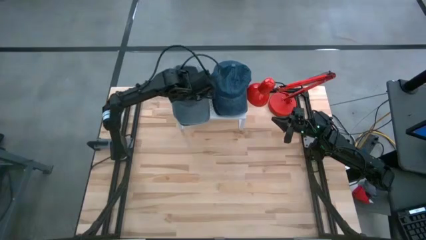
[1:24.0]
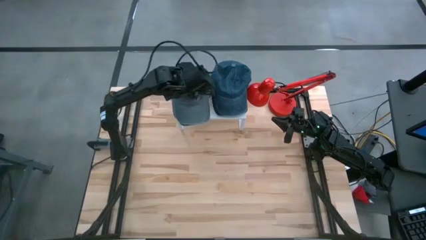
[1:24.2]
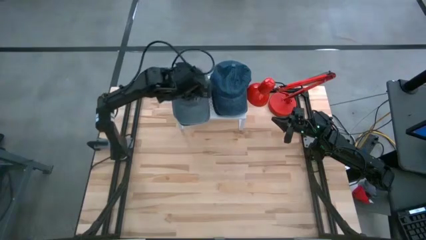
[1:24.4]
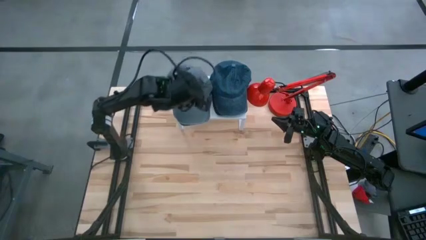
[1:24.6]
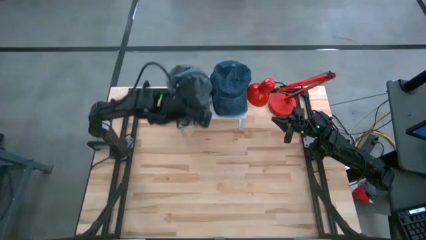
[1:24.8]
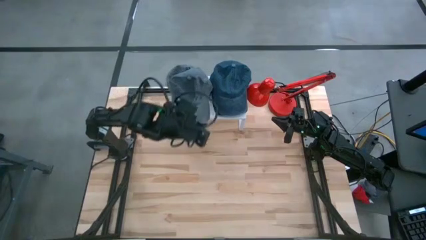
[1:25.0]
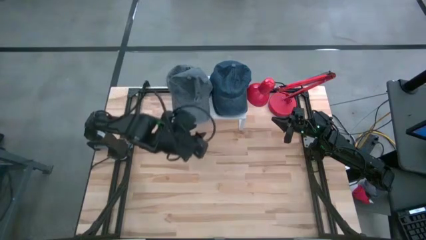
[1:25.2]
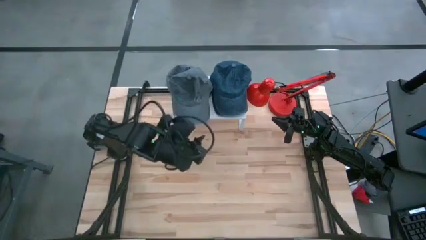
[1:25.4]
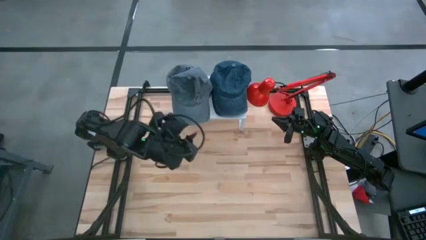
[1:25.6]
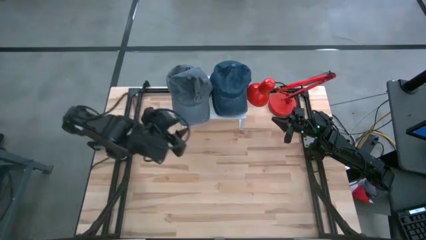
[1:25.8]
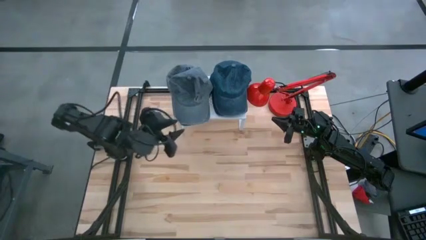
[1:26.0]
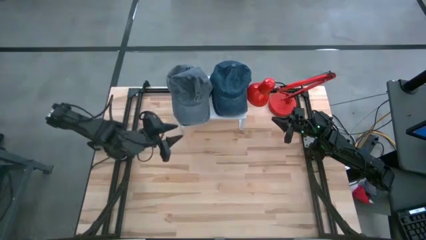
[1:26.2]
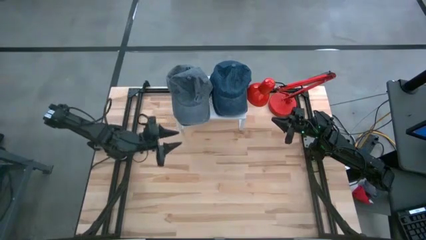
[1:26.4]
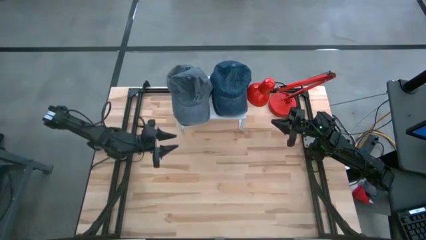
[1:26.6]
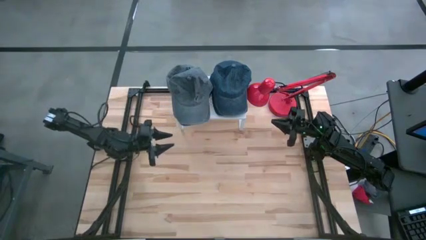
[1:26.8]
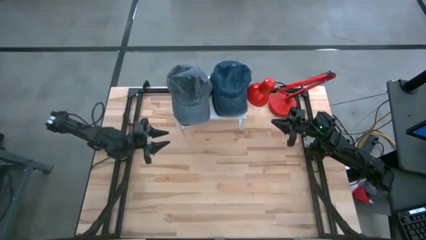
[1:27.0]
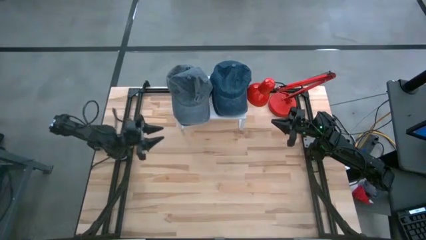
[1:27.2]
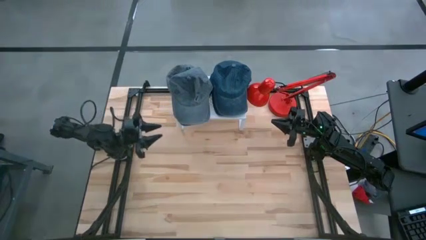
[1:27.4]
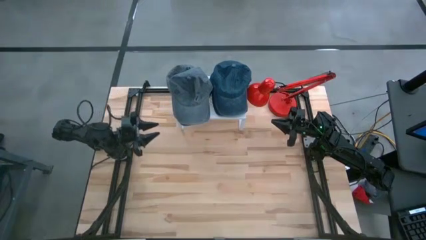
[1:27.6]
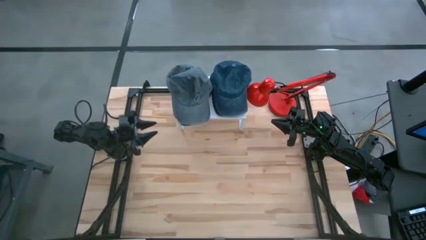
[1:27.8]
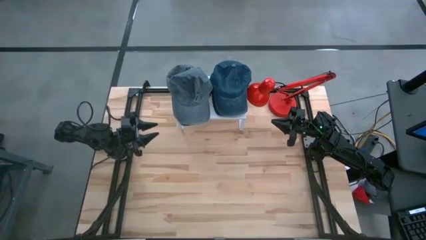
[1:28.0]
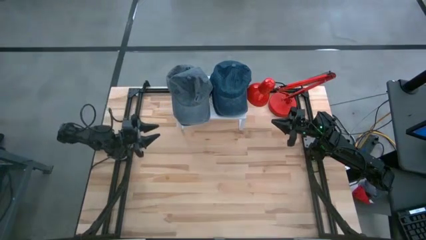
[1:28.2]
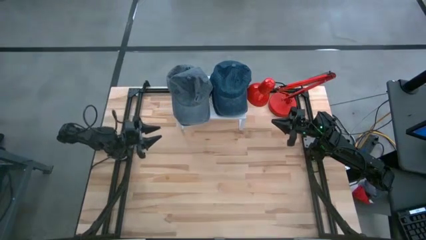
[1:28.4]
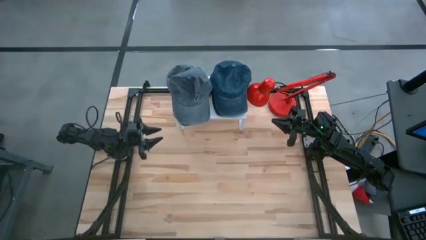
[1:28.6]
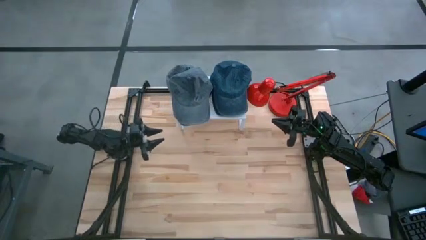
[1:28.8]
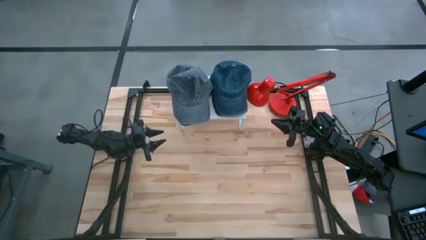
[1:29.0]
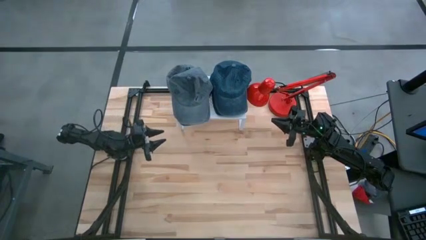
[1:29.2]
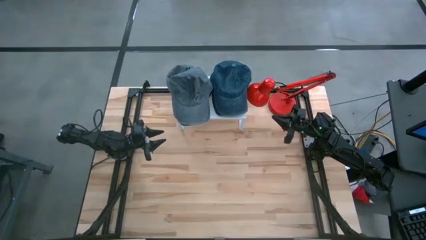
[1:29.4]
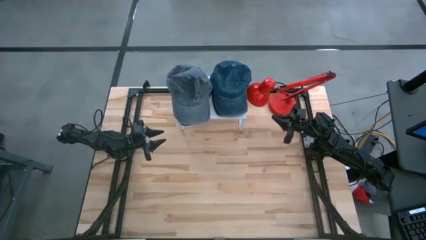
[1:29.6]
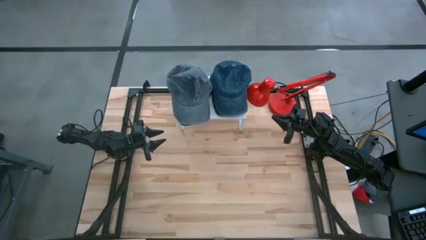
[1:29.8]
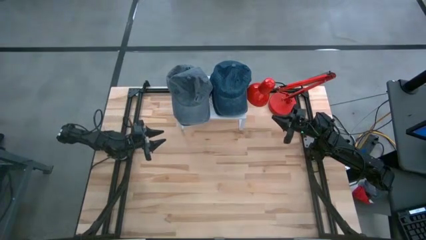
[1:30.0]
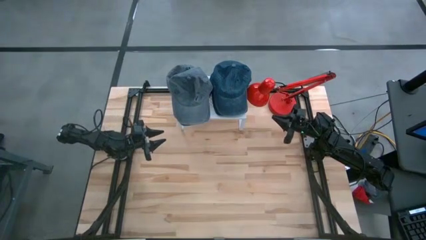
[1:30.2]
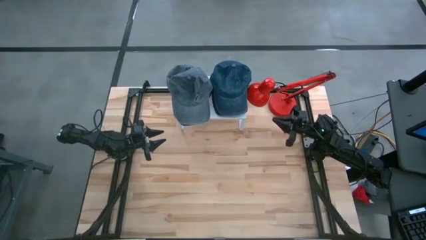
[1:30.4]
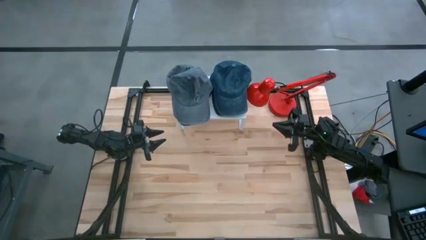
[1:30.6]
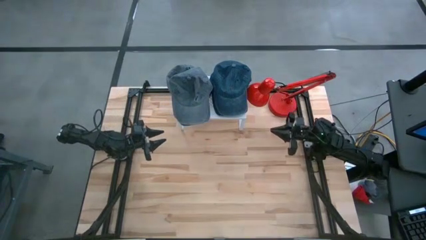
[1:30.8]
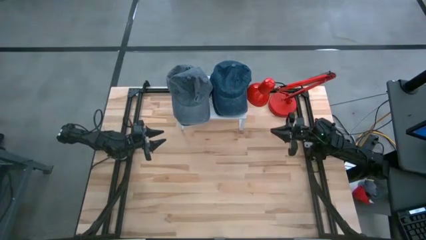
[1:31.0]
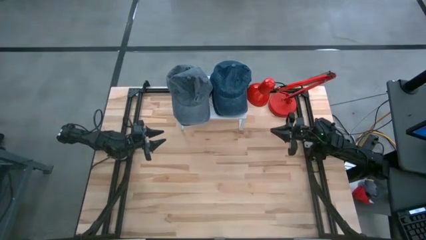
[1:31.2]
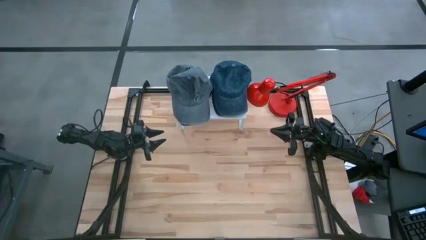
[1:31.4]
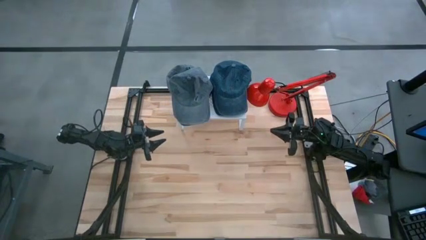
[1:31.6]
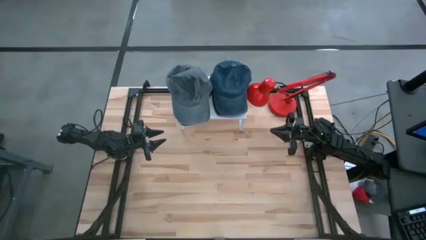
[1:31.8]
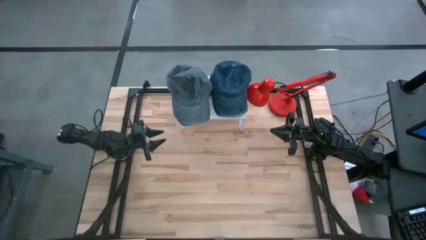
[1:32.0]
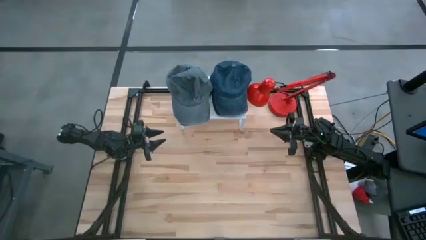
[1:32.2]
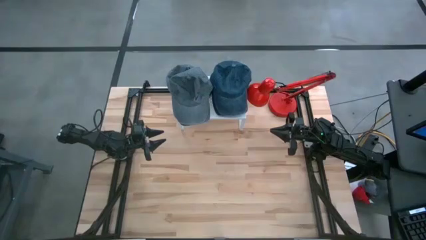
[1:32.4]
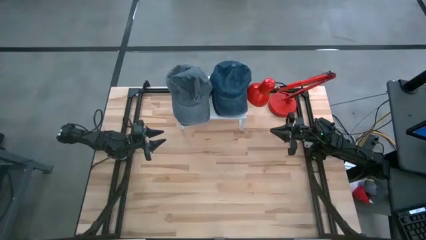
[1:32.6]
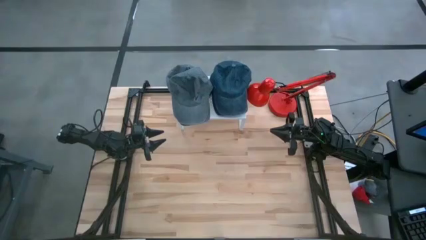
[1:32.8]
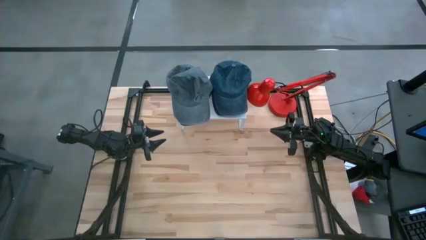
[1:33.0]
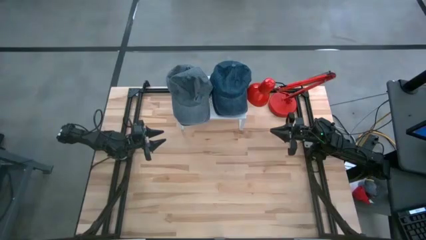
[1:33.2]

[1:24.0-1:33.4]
Task: Pick & Place hat
Return to Home Position

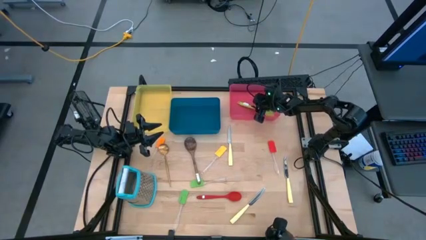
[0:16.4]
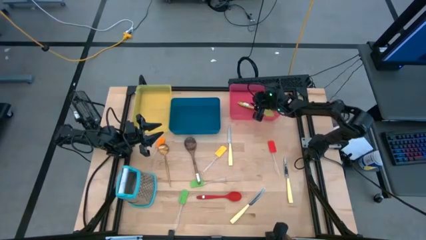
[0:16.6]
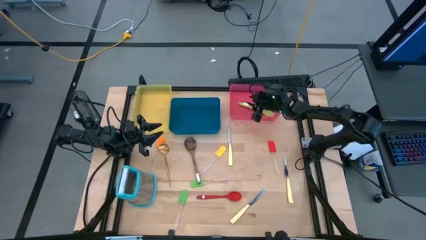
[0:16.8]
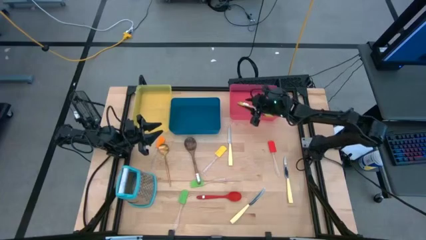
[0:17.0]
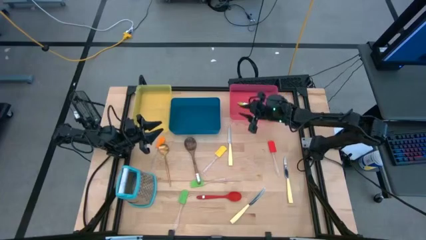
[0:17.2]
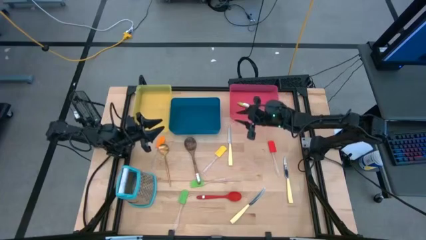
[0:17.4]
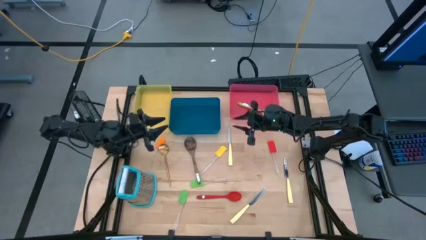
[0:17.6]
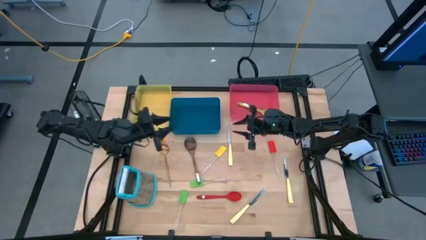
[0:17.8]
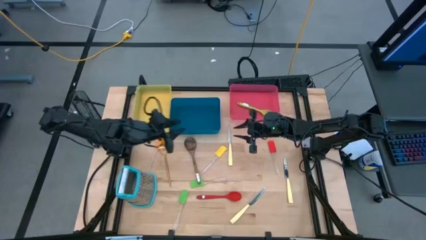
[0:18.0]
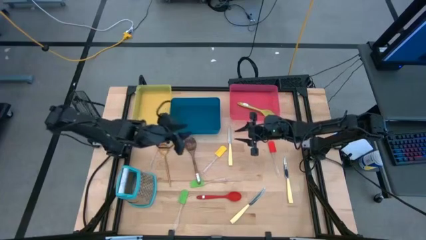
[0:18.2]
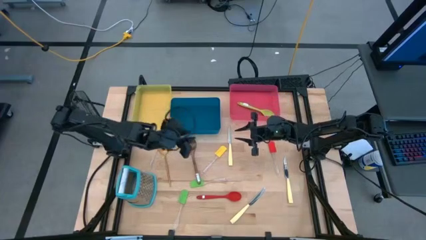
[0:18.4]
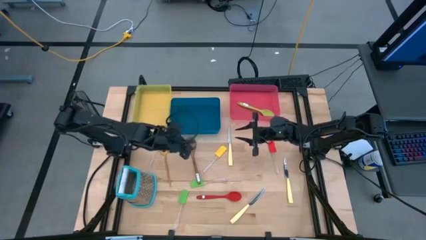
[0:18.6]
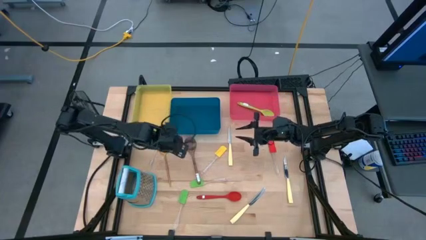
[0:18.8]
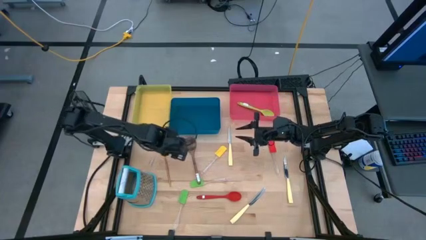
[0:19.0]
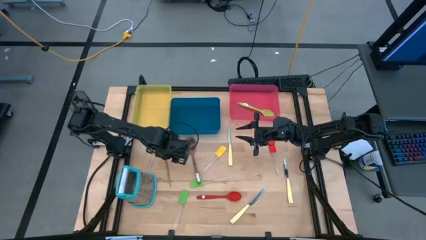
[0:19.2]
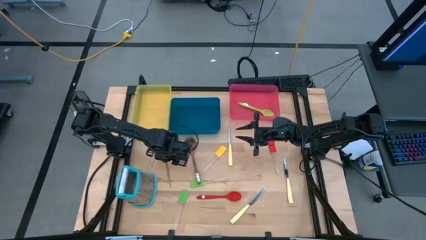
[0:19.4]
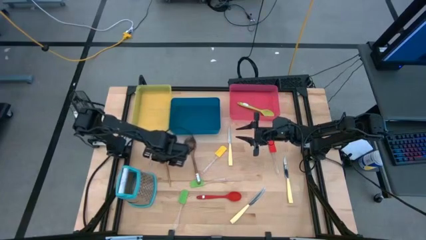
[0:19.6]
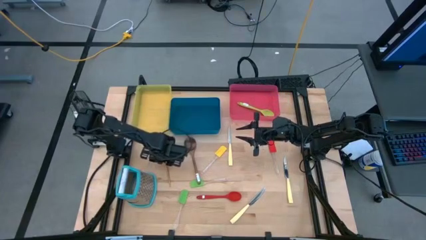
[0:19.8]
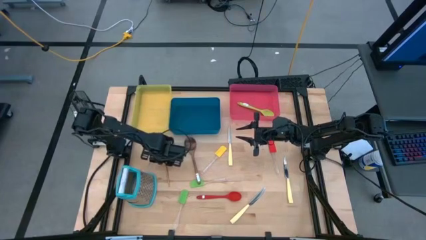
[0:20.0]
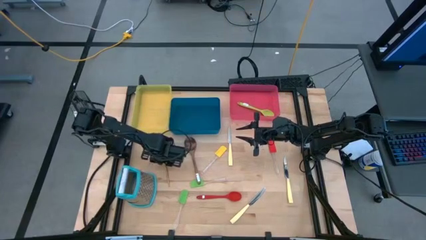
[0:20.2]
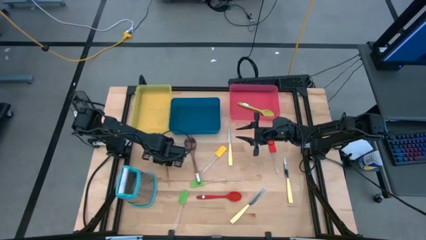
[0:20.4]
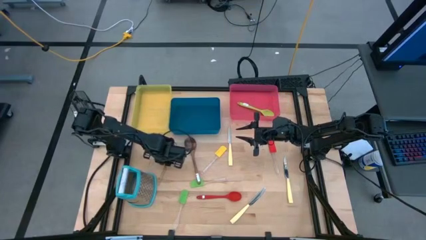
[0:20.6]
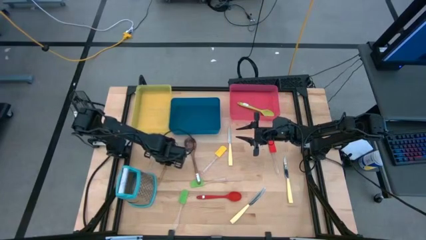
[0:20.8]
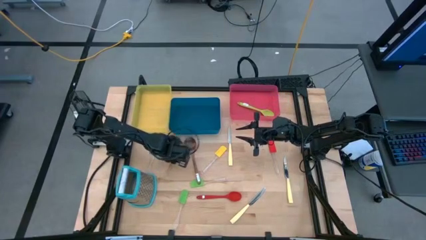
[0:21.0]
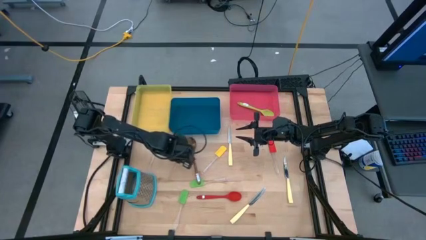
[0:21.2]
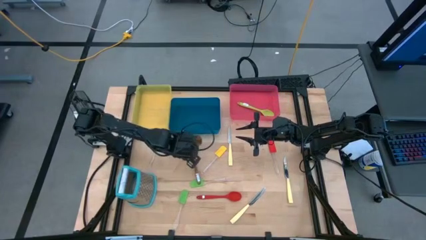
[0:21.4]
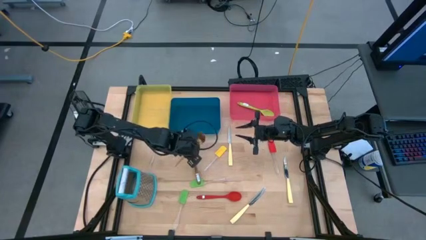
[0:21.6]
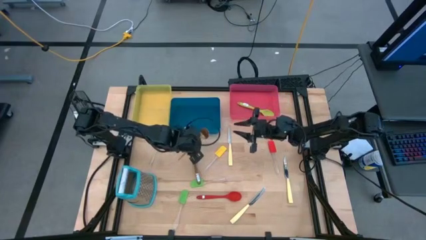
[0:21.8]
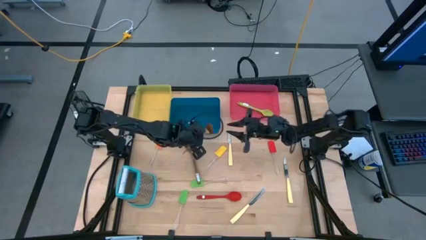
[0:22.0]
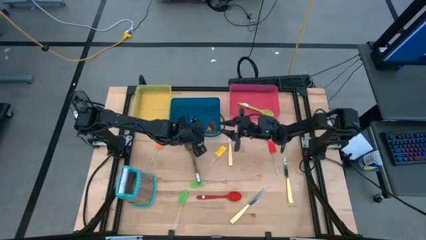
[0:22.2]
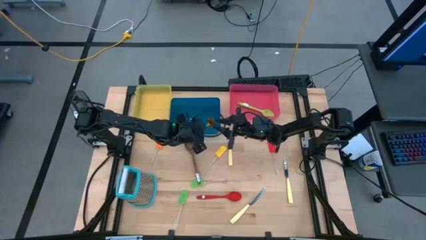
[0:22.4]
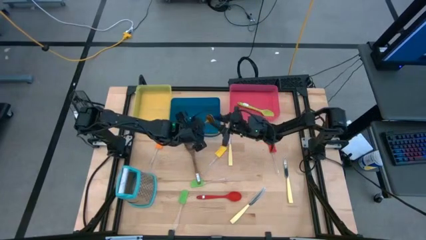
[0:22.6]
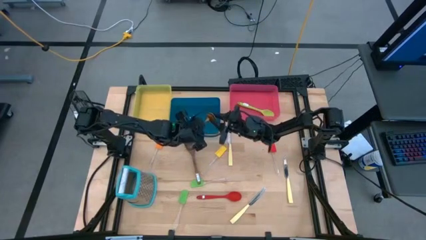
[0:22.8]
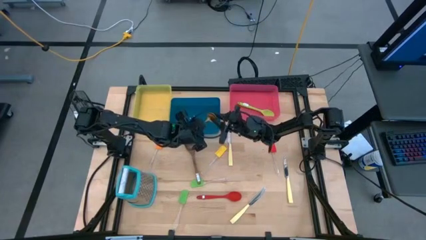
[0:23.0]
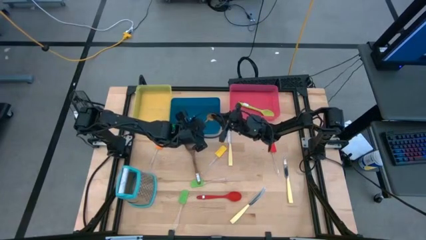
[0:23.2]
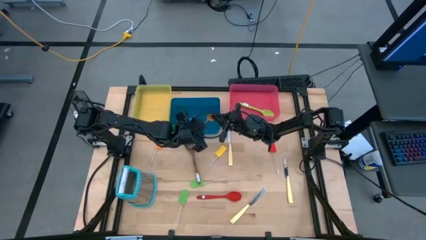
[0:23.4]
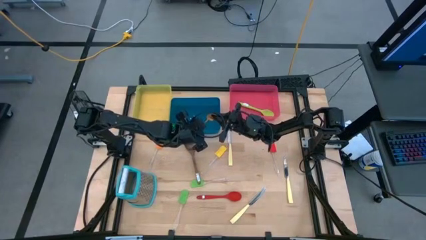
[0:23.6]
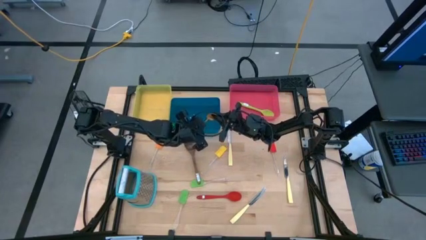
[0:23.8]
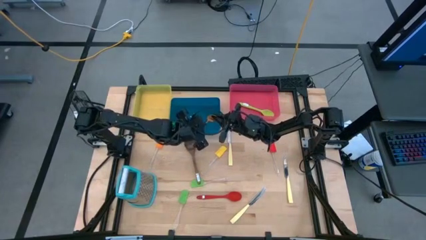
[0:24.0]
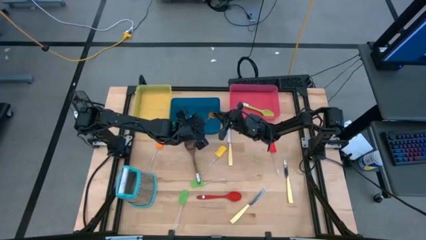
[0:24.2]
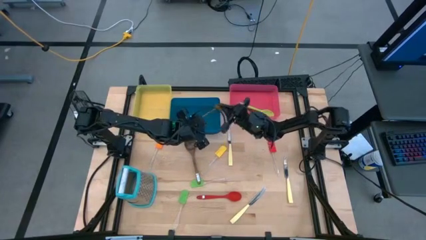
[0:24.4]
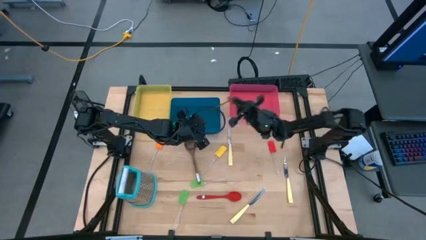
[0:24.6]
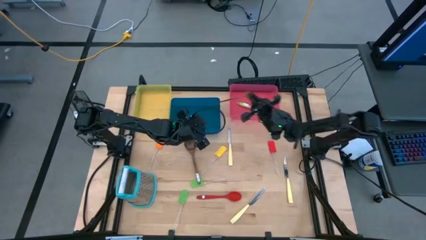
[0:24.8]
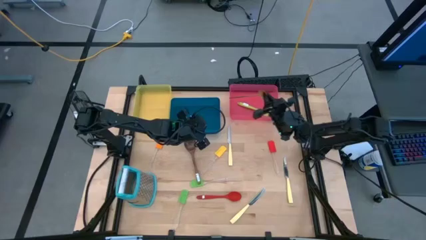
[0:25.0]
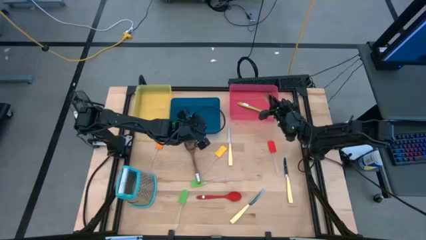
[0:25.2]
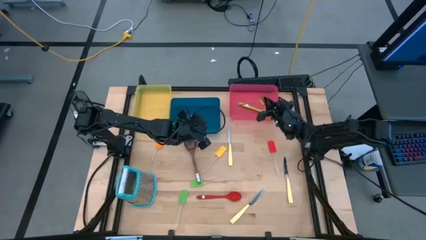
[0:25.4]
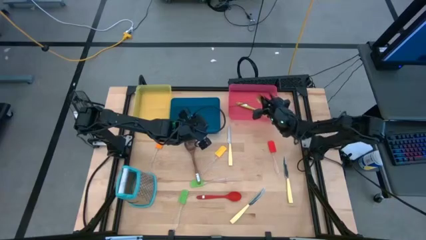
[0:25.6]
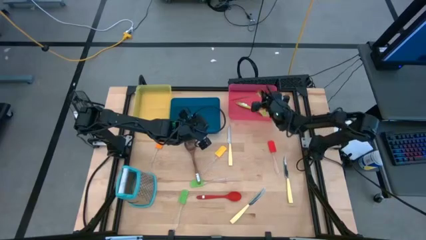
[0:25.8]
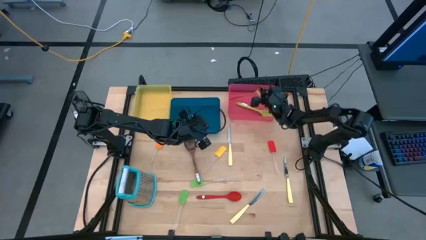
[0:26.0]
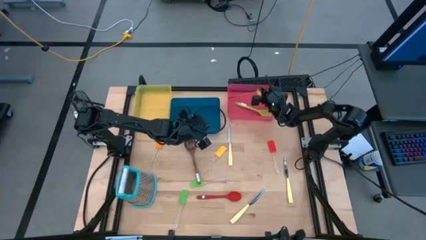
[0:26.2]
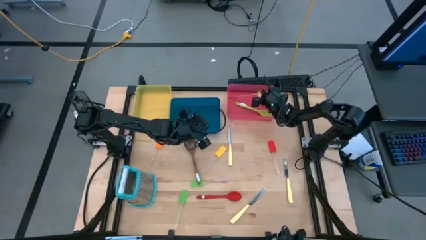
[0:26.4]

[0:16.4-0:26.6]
Task: Pick & Place Kitchen Items
Put the gold serving spoon into the red bin
